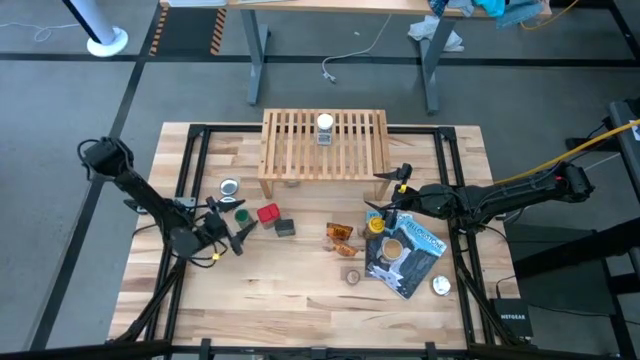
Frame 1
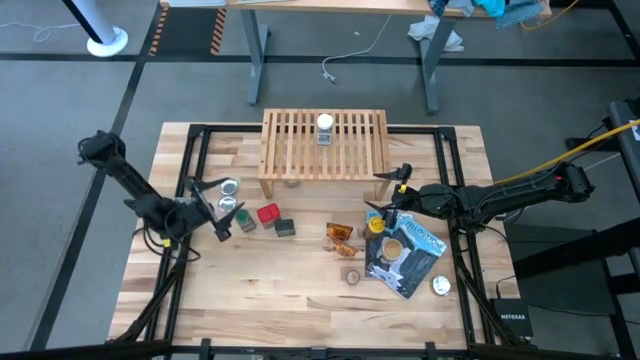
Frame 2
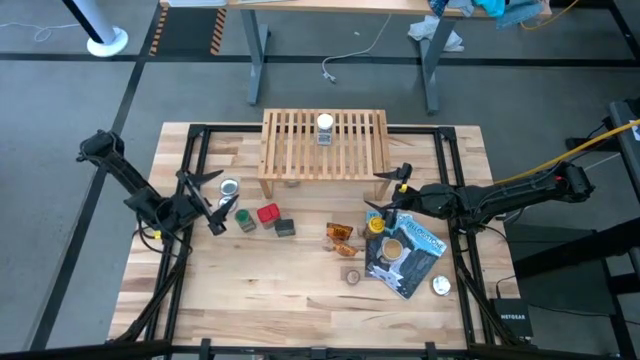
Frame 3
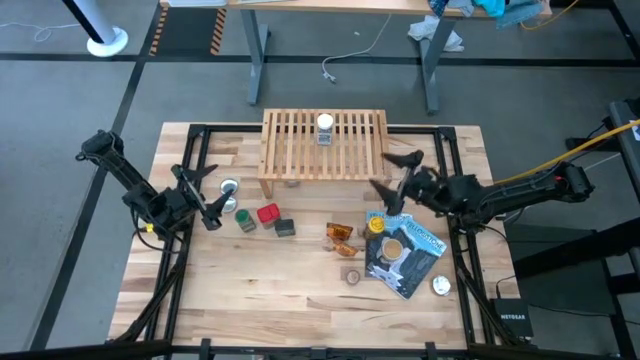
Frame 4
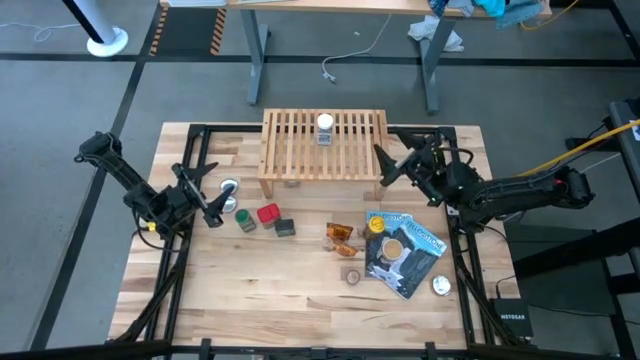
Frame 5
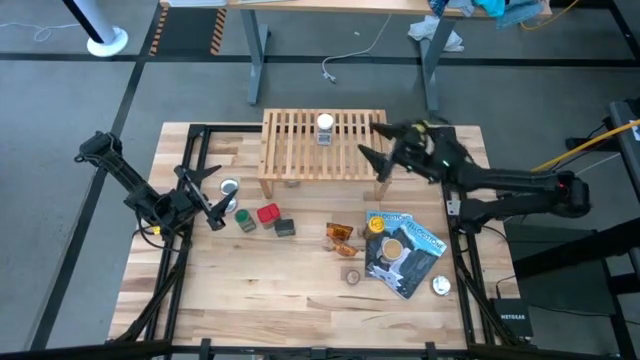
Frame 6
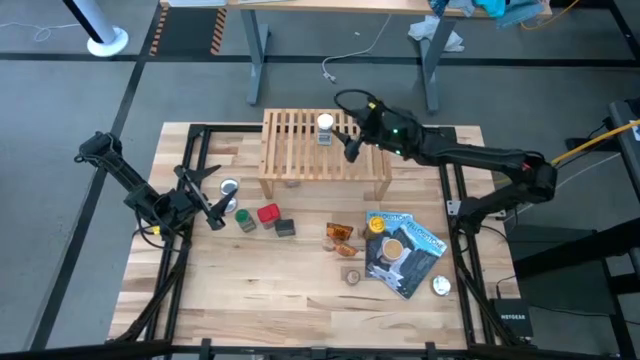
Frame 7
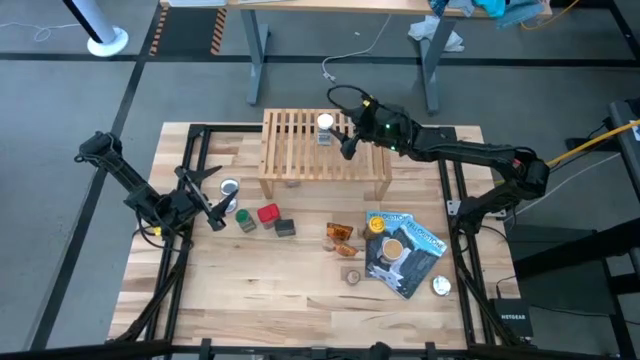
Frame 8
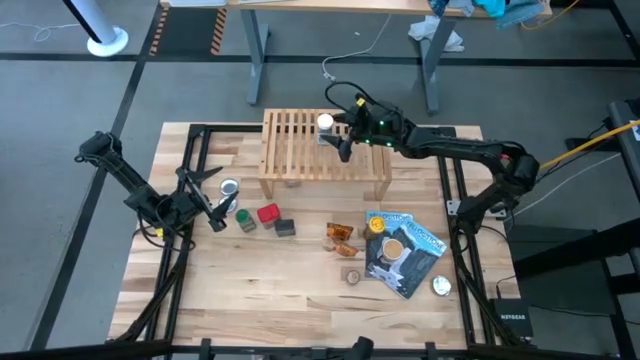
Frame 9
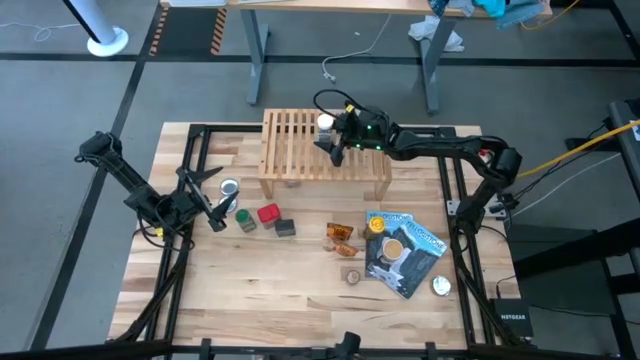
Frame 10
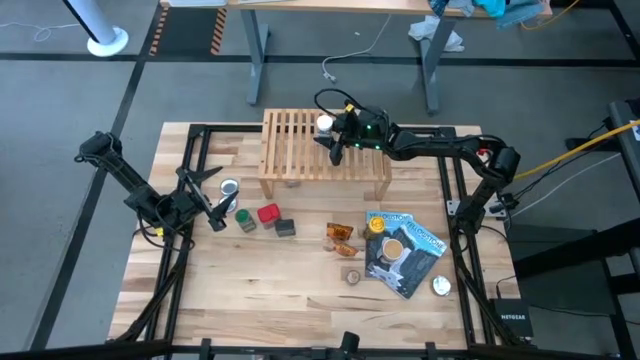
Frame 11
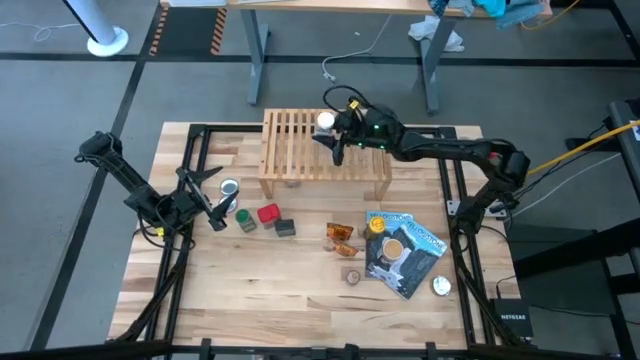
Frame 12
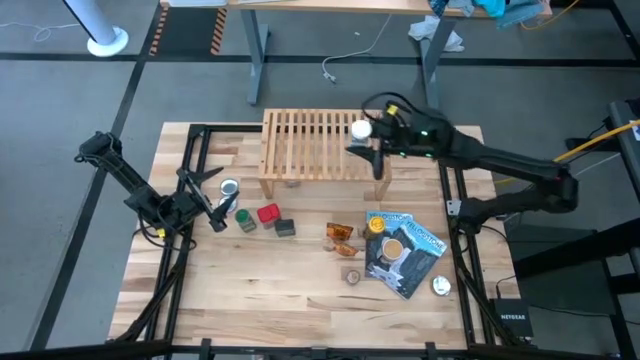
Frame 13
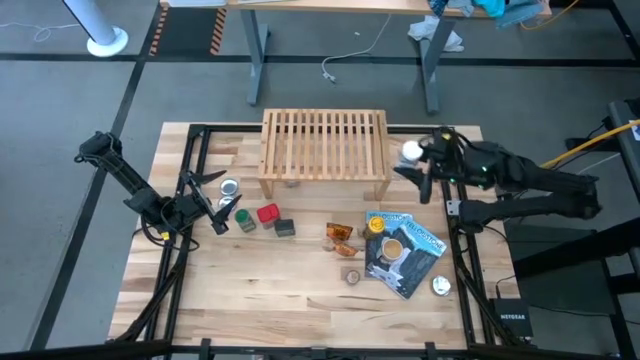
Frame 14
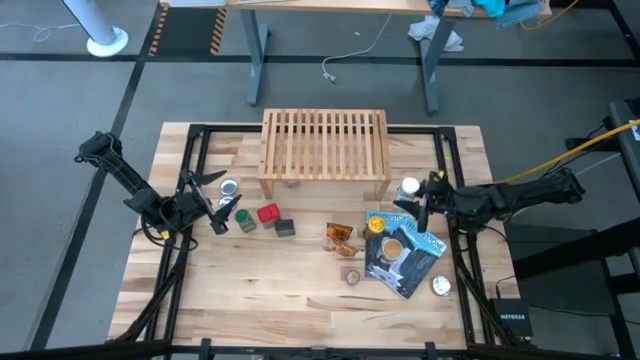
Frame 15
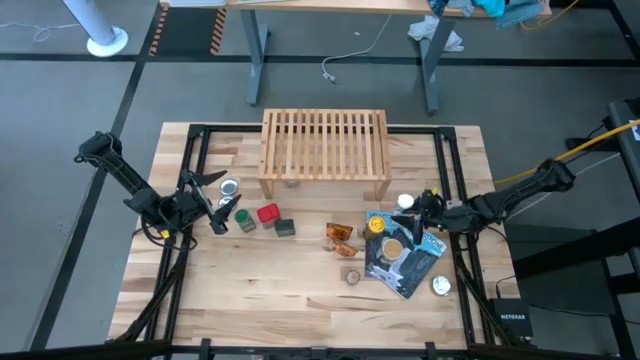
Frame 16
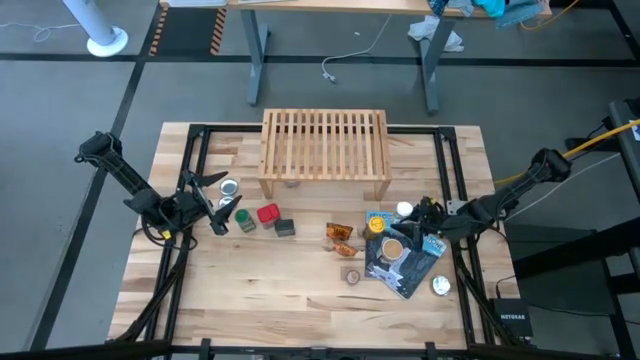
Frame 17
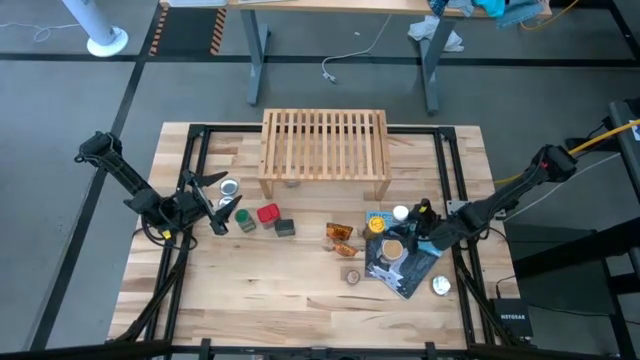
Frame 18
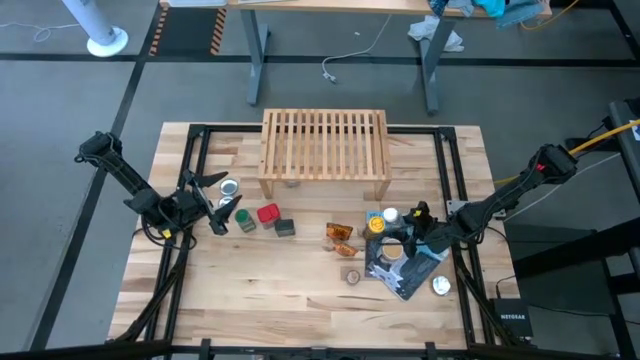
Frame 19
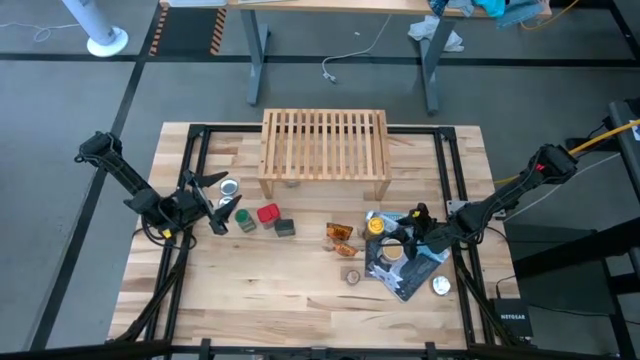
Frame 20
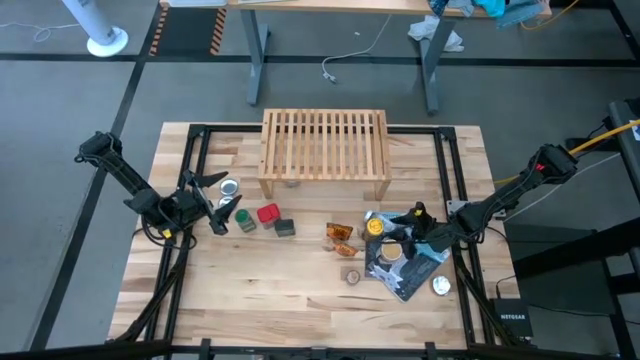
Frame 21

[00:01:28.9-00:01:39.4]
Task: Shelf spices
Remove the white seasoning bottle from the shelf

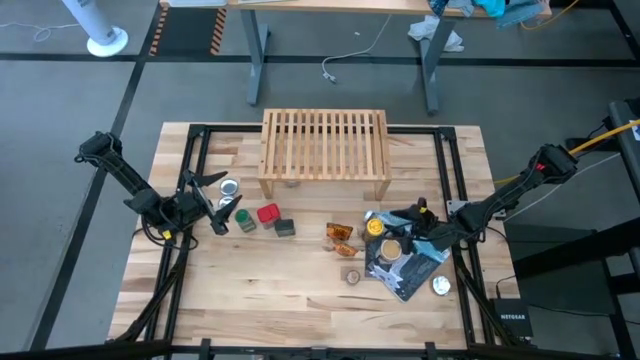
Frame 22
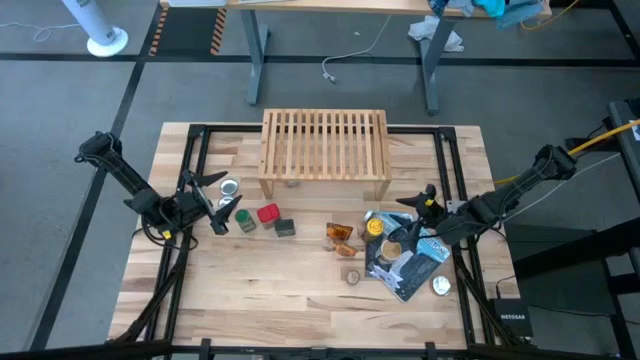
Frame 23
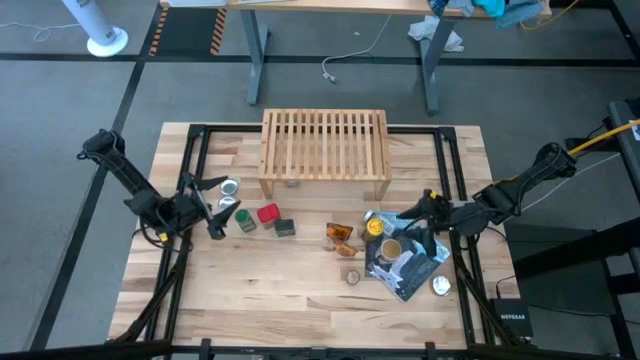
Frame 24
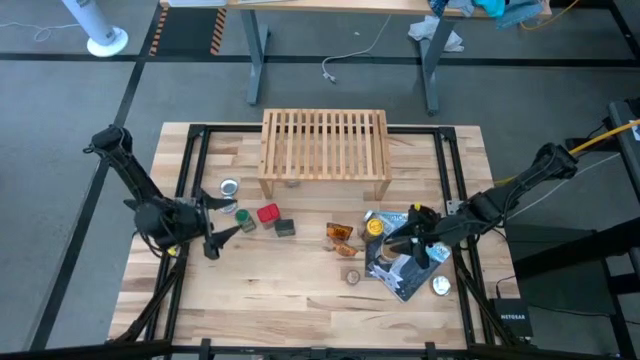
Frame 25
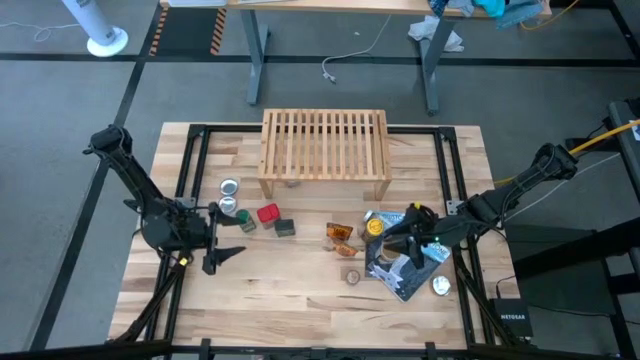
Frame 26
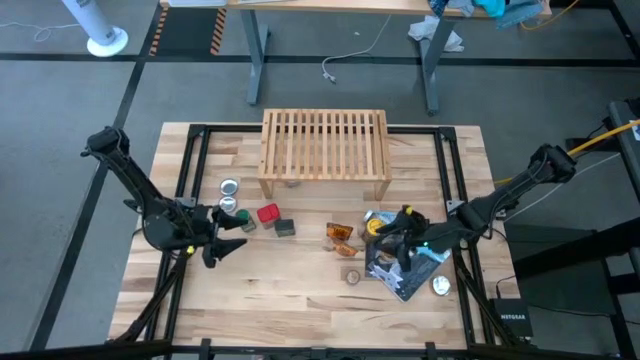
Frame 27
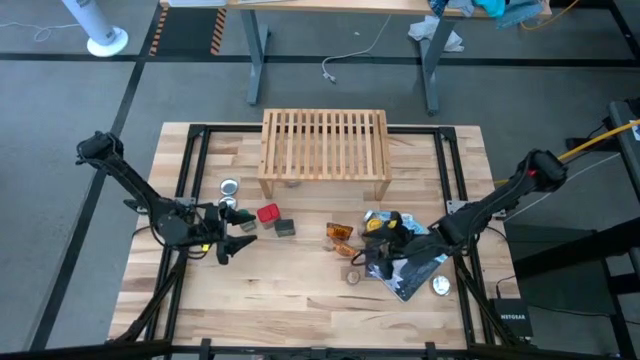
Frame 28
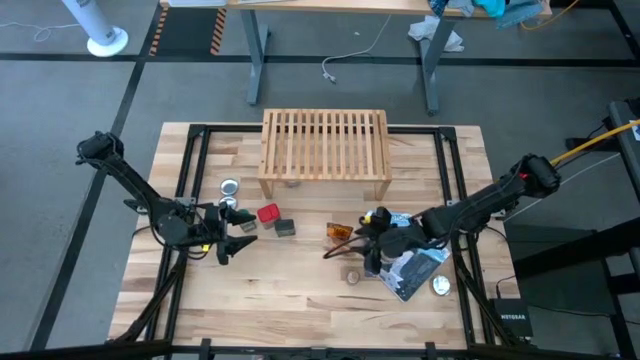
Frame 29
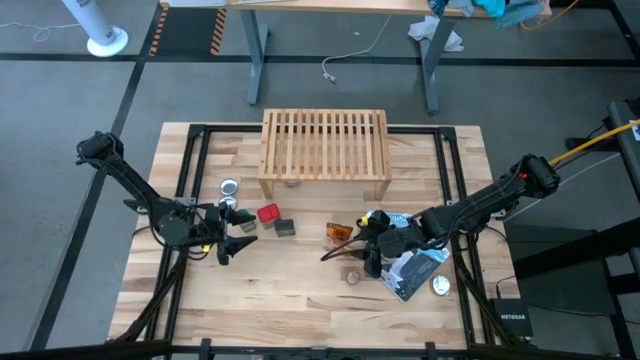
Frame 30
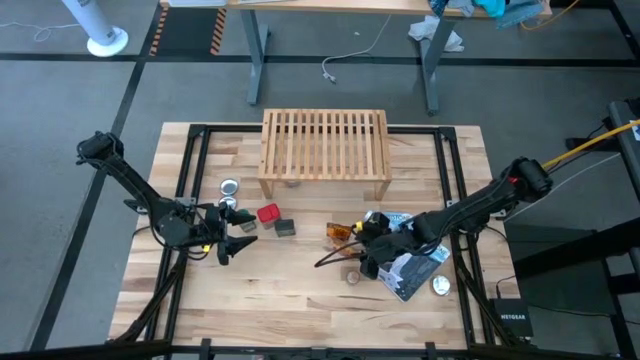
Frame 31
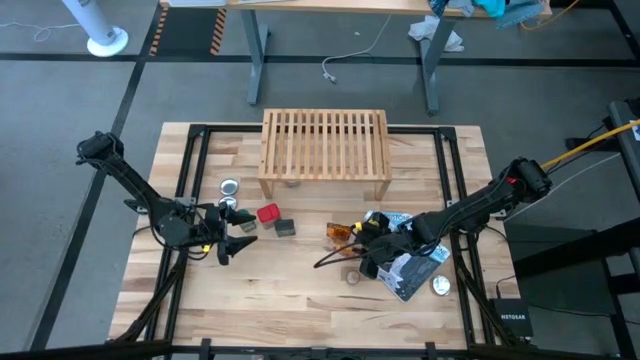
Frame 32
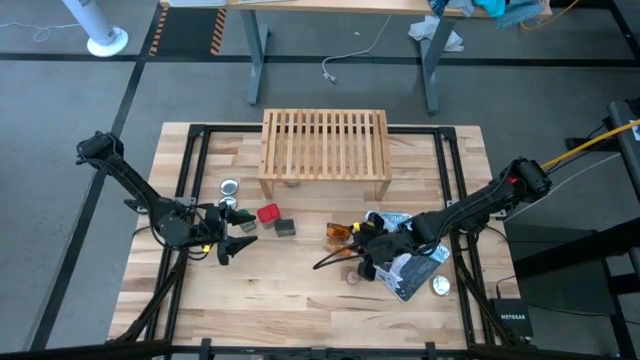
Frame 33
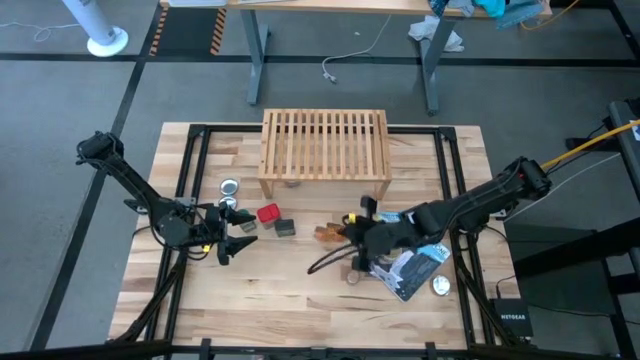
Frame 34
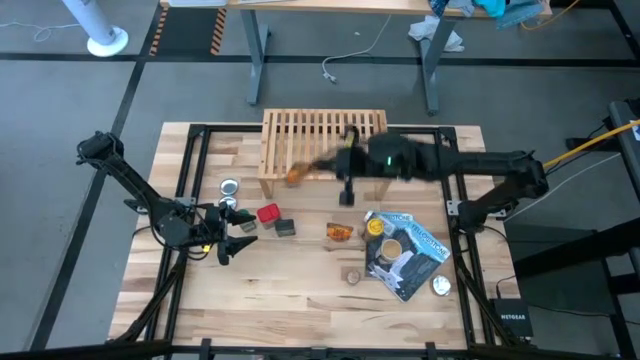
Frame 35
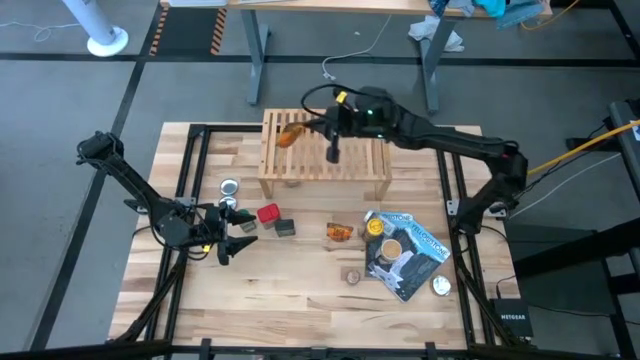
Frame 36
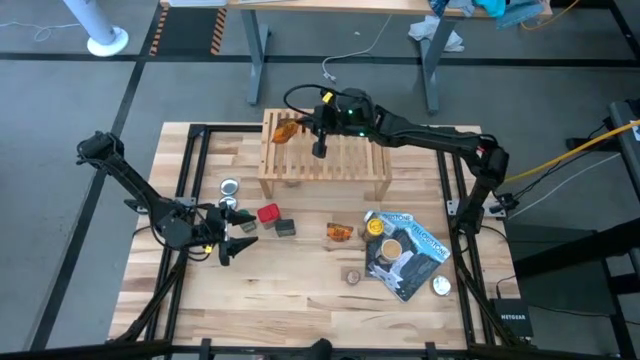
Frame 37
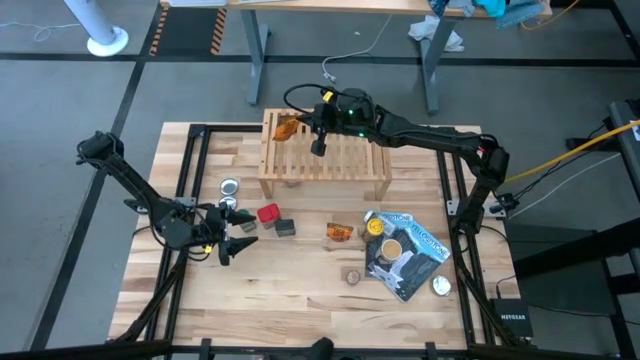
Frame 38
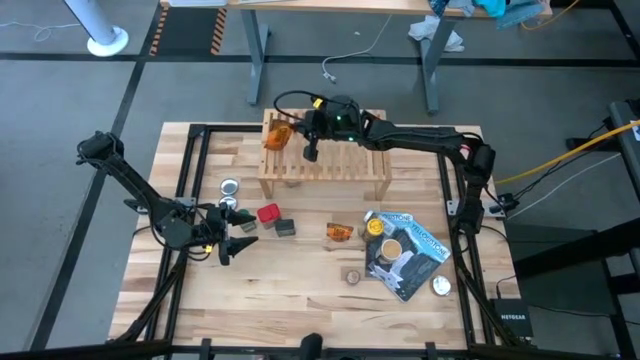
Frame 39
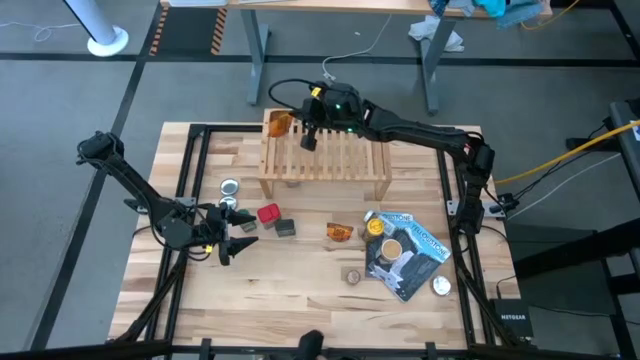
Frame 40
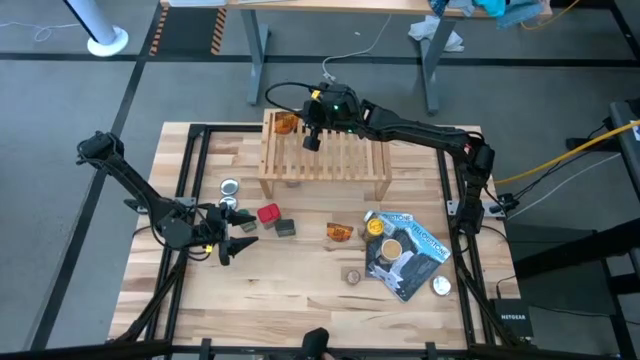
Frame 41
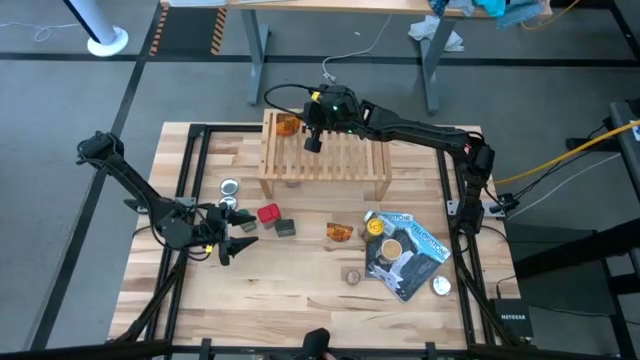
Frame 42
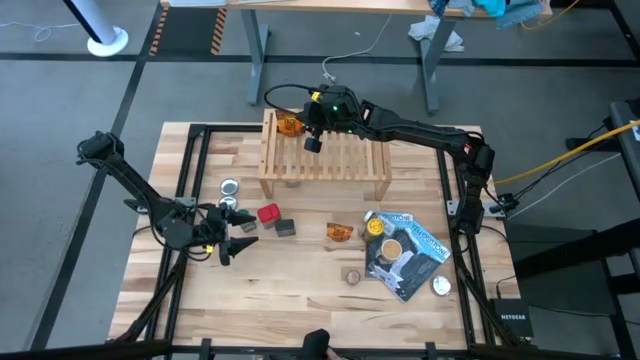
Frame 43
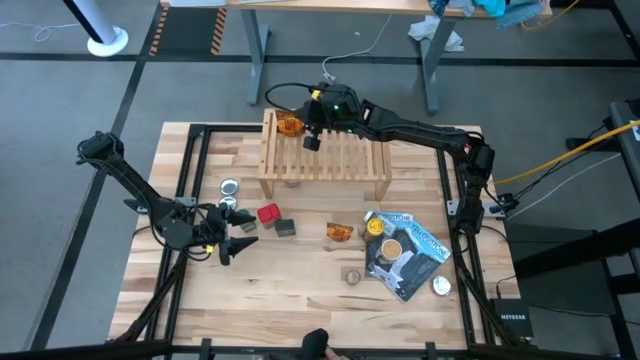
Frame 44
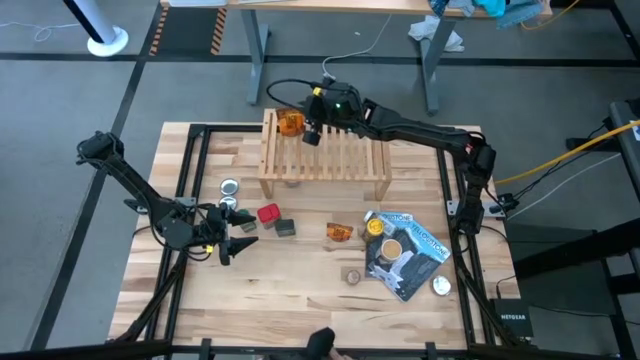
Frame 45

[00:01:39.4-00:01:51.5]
Put the bottom orange seasoning pack on the shelf
